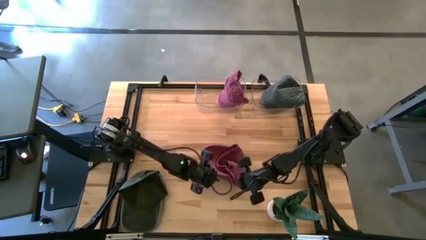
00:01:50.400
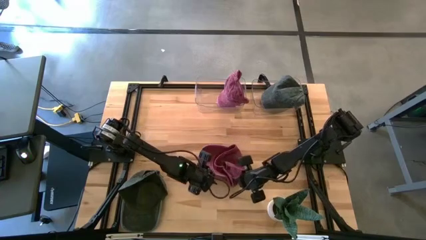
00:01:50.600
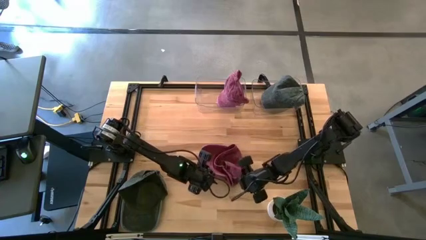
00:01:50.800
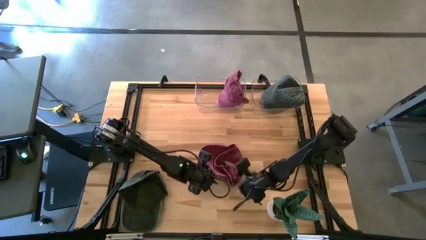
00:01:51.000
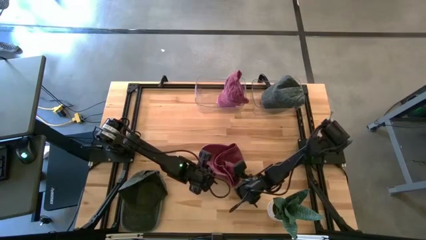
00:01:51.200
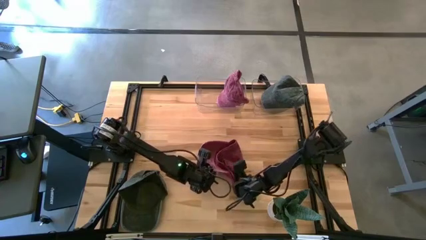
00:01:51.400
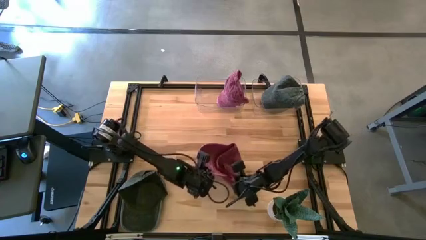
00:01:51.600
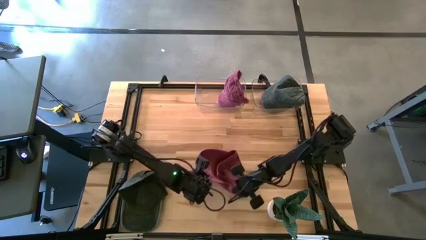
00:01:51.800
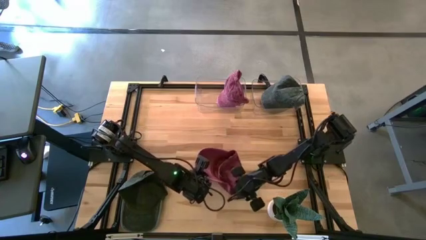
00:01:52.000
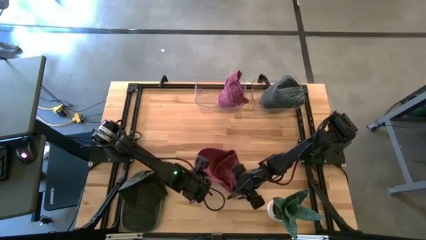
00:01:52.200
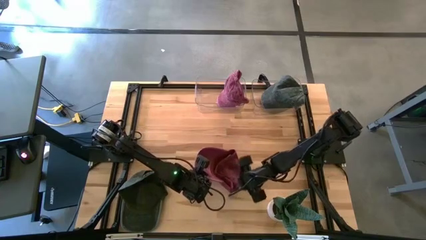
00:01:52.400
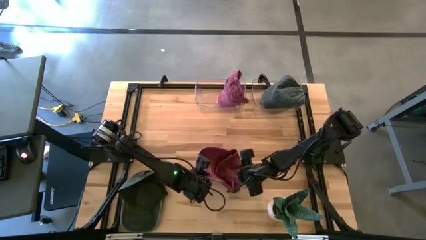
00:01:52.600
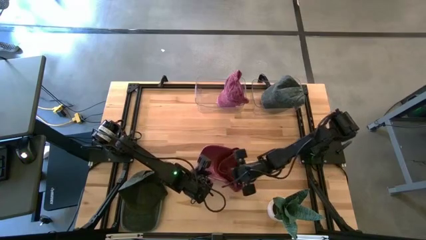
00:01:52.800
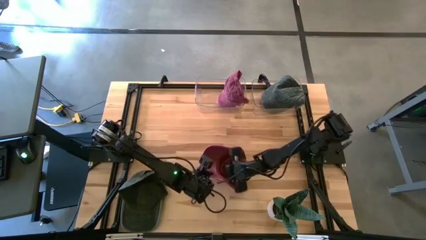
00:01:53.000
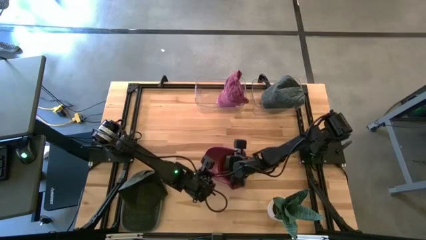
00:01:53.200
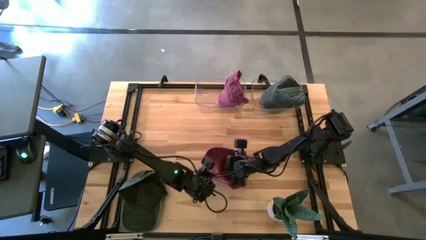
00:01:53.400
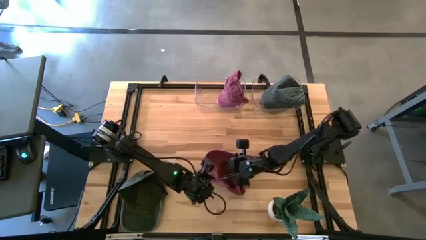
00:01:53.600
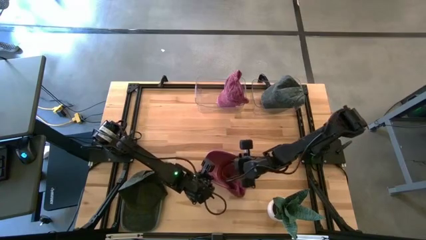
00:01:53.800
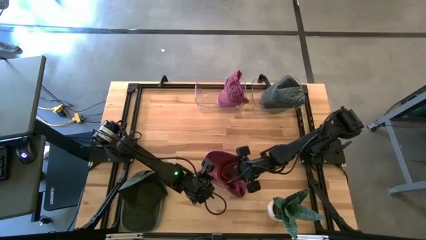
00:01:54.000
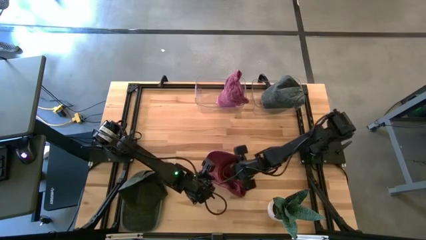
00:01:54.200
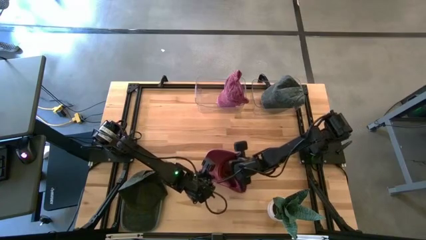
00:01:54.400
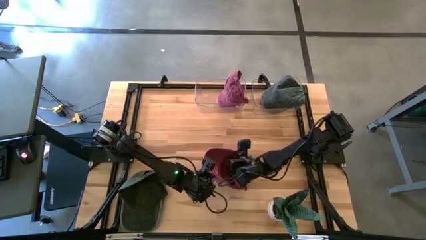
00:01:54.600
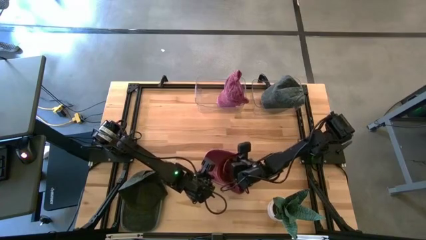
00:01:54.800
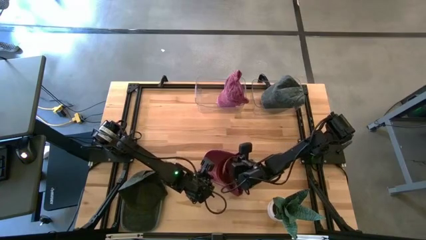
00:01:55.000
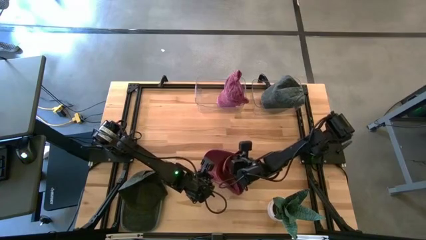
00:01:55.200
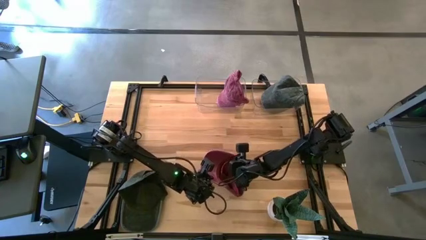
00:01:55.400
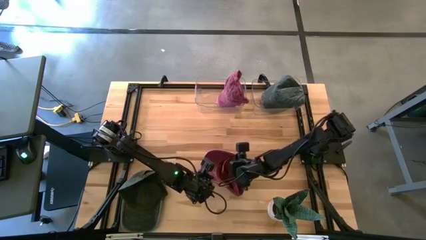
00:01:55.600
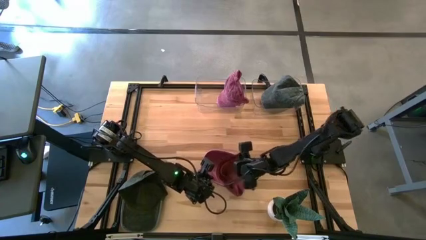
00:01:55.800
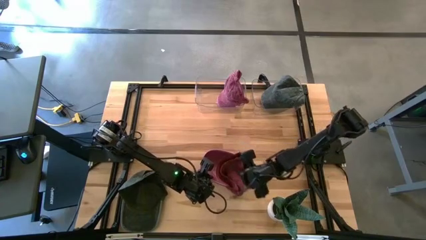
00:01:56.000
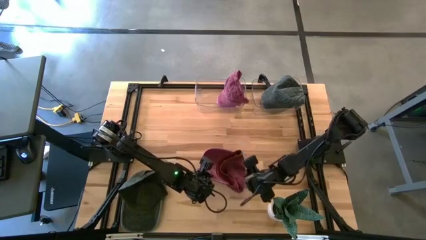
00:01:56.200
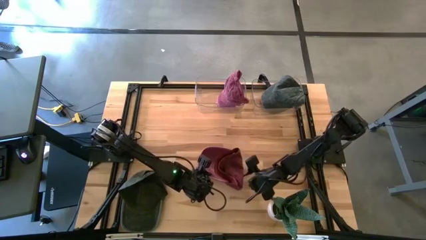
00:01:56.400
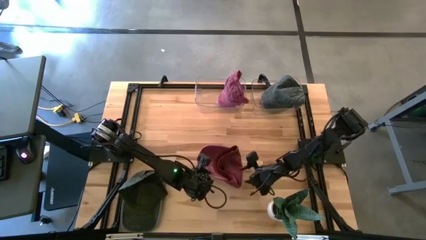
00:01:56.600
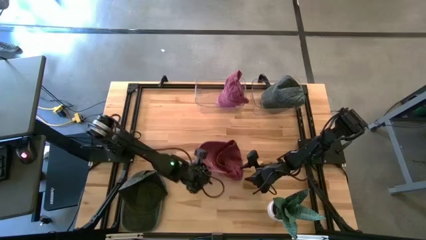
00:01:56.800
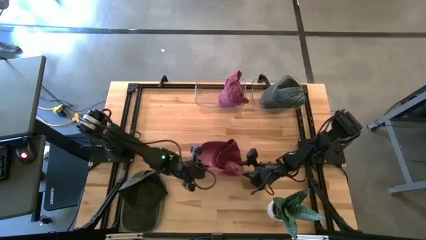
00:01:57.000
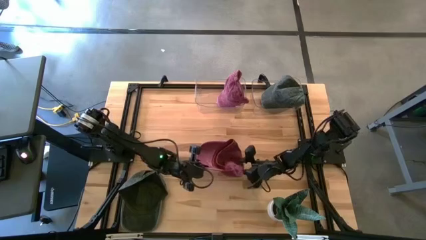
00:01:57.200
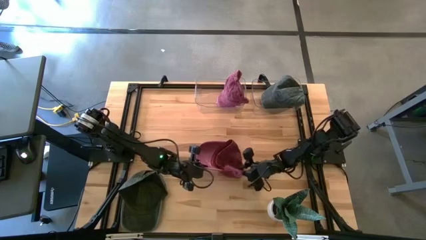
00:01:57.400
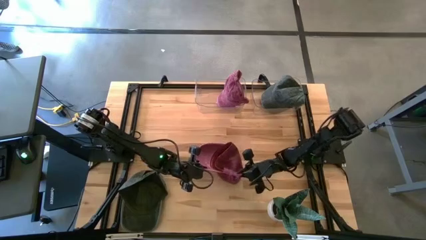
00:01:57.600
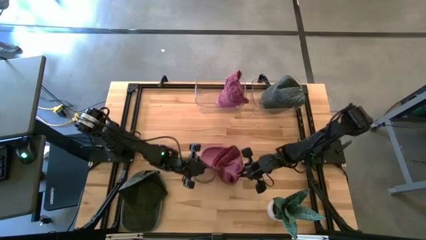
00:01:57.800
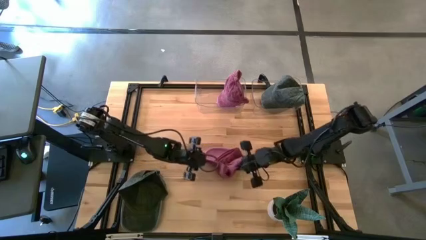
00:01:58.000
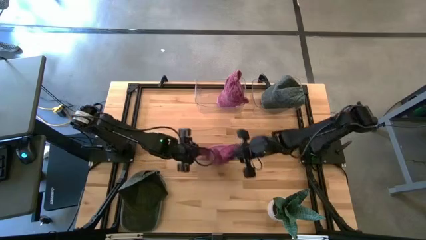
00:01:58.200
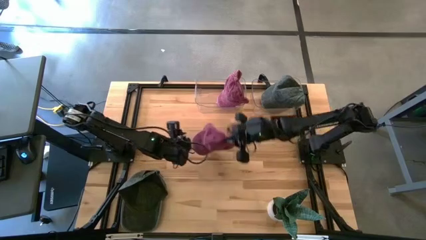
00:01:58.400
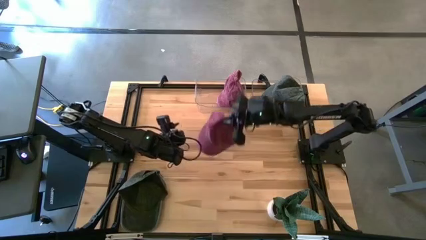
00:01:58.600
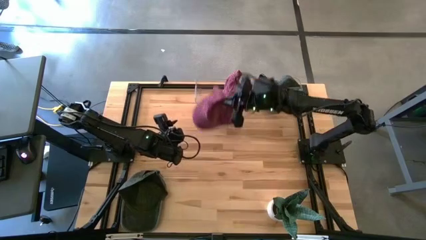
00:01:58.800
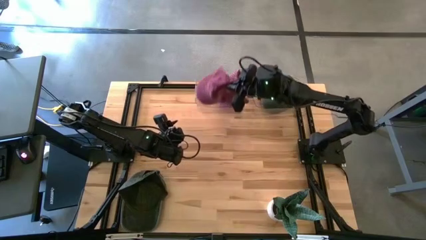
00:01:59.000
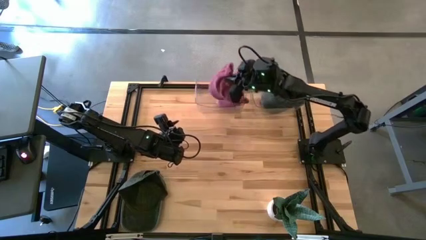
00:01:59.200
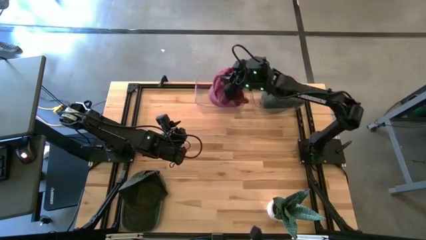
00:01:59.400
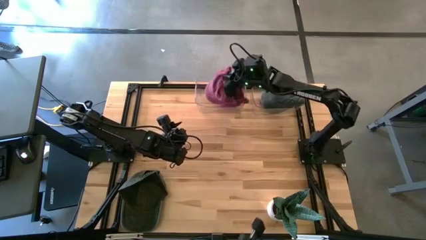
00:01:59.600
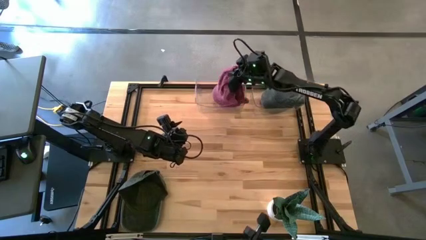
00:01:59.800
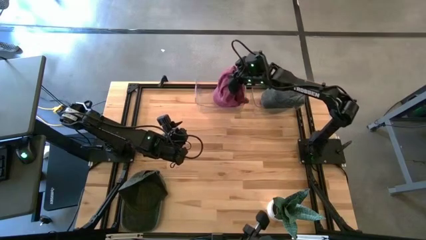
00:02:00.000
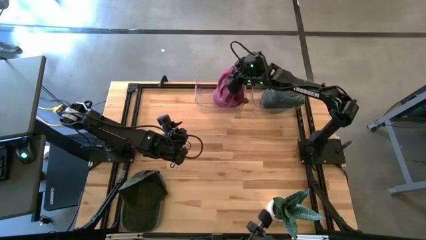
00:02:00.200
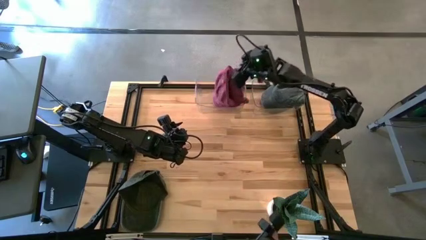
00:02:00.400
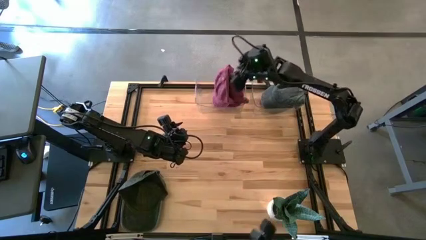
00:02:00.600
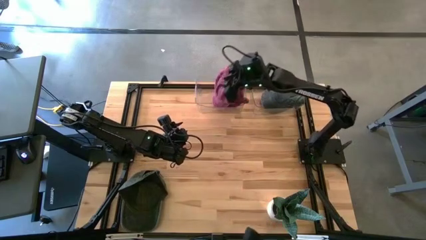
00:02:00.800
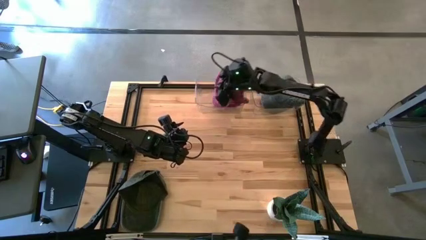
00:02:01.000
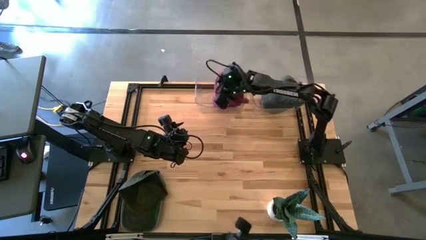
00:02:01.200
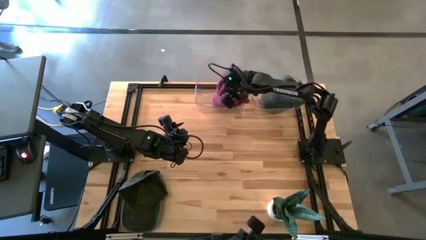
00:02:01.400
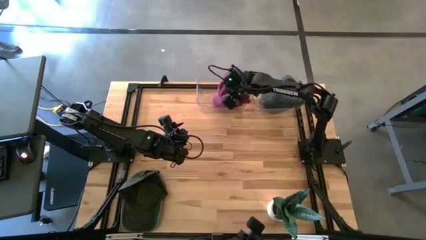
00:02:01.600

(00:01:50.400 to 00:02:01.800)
Task: Pick & Place hat
Put the red cap into the left transparent bin
